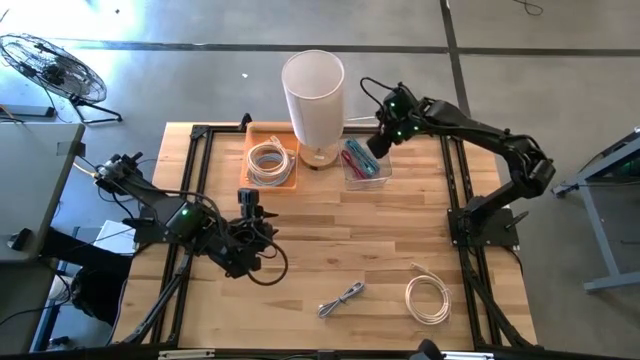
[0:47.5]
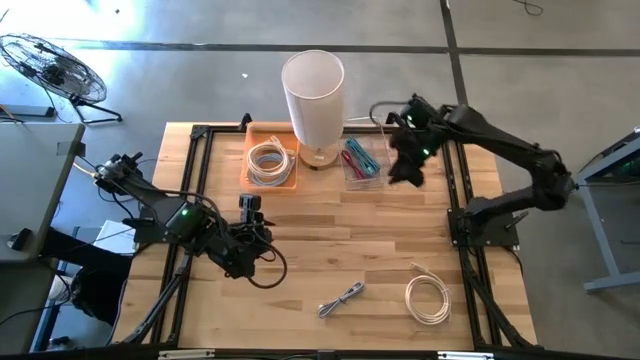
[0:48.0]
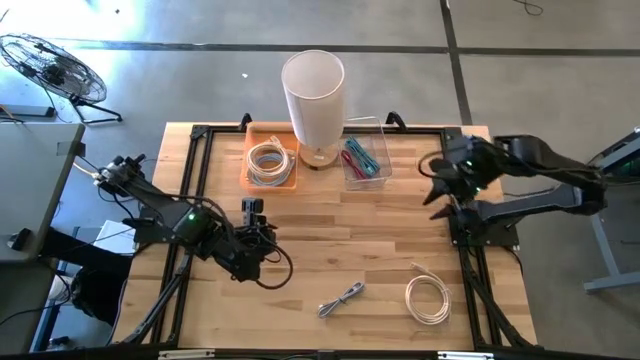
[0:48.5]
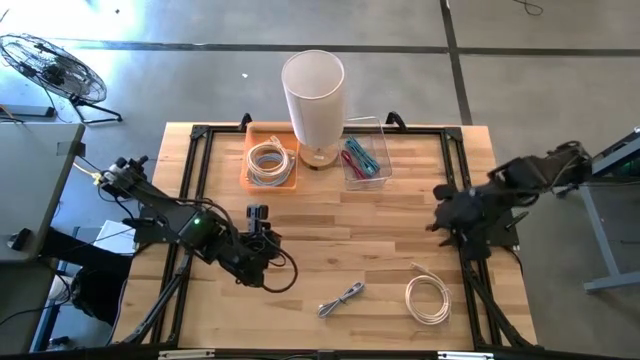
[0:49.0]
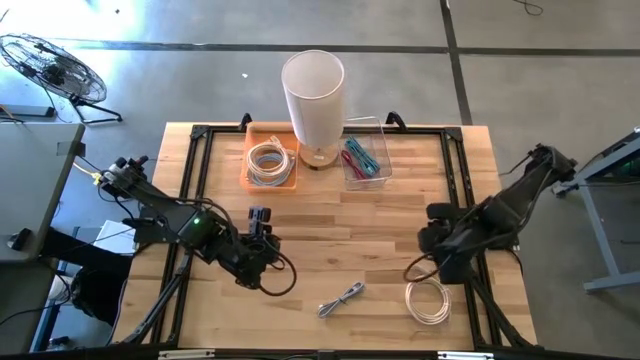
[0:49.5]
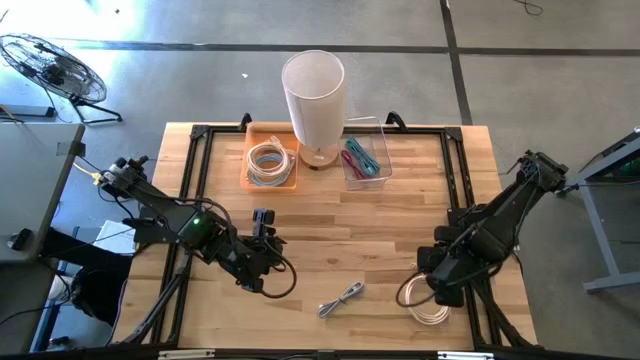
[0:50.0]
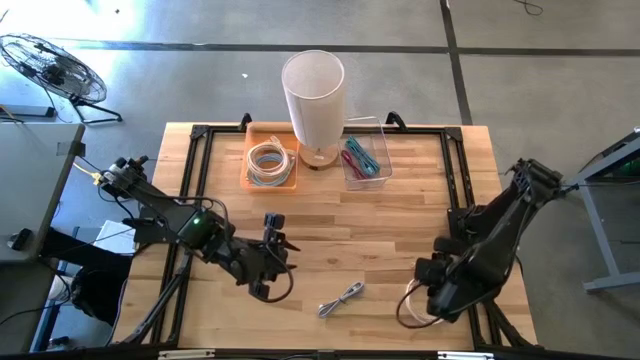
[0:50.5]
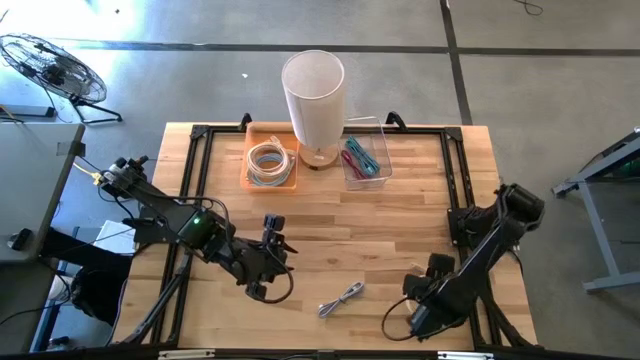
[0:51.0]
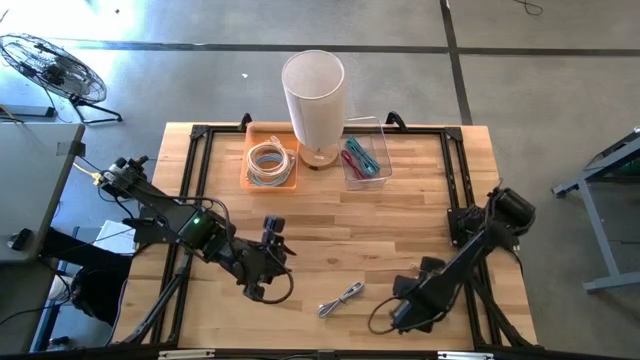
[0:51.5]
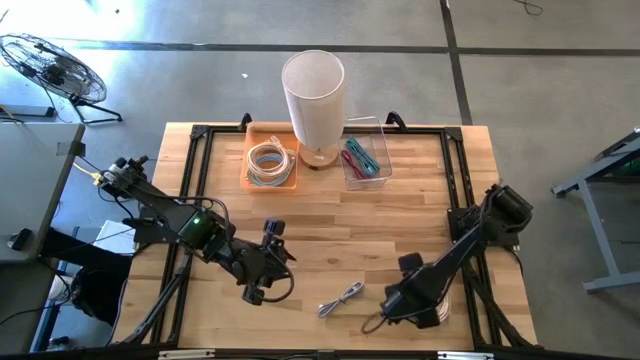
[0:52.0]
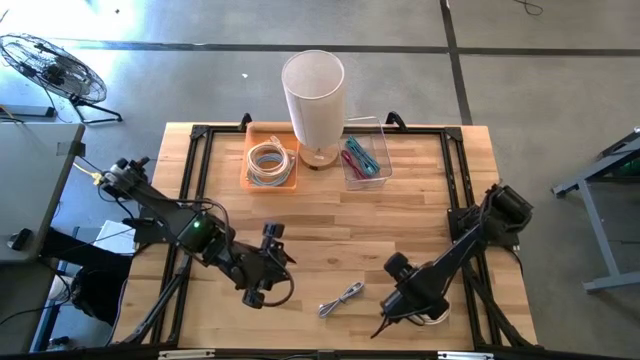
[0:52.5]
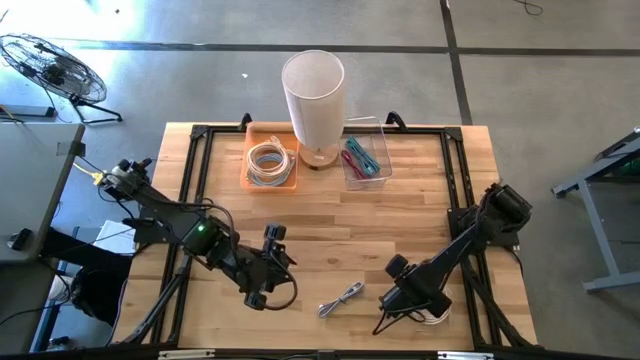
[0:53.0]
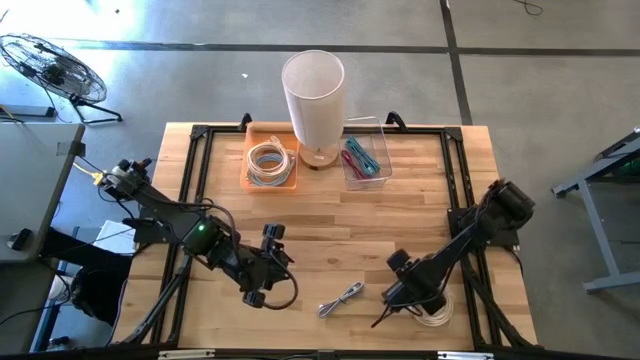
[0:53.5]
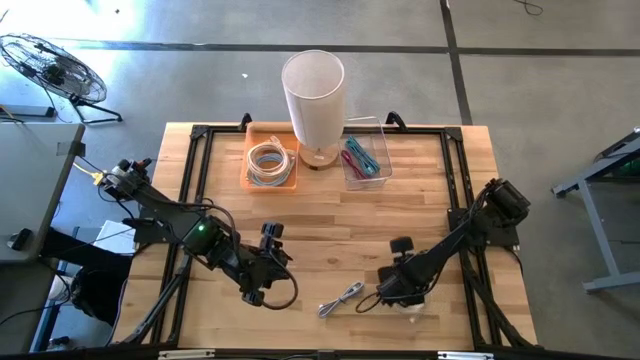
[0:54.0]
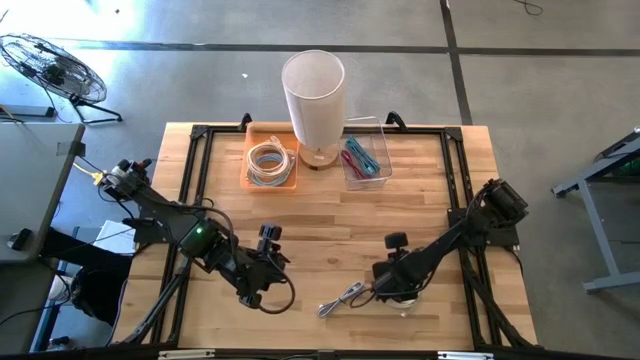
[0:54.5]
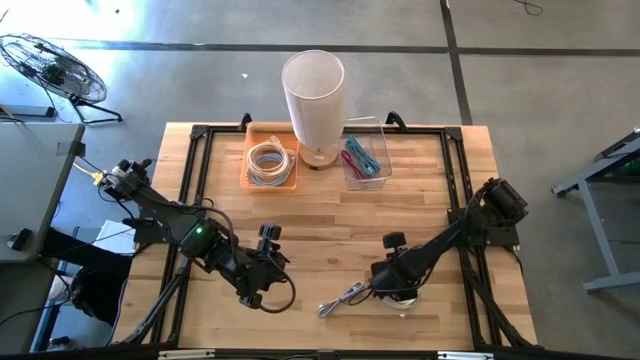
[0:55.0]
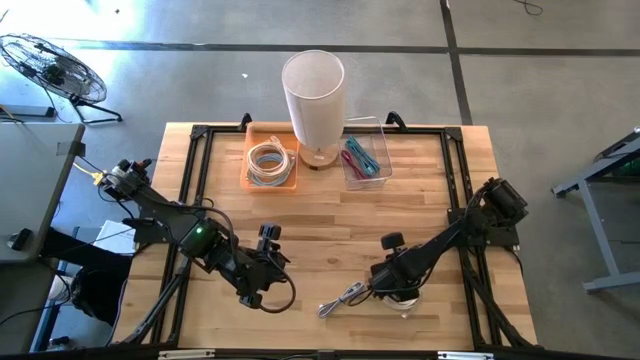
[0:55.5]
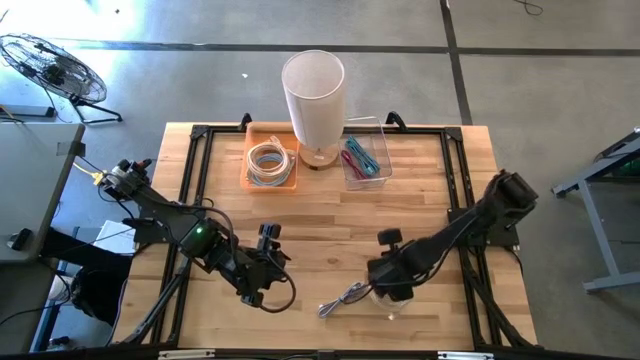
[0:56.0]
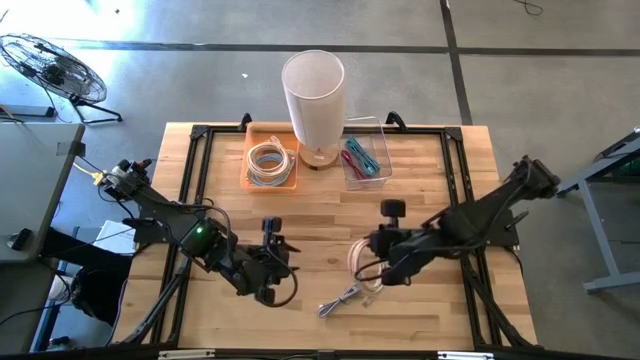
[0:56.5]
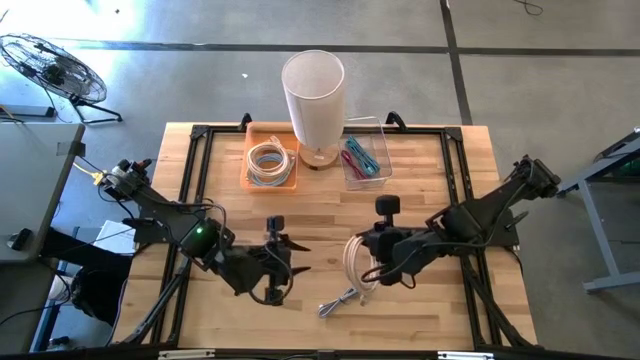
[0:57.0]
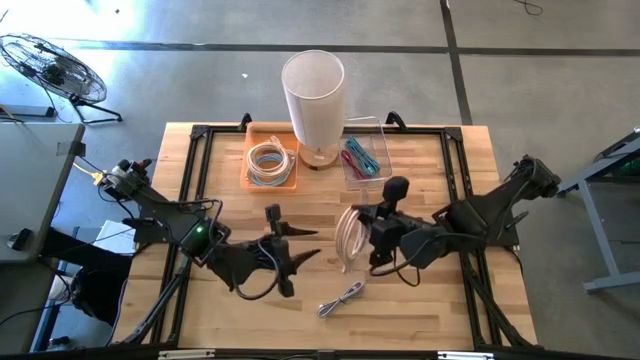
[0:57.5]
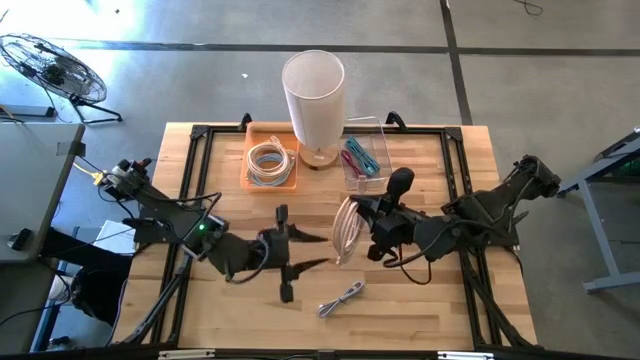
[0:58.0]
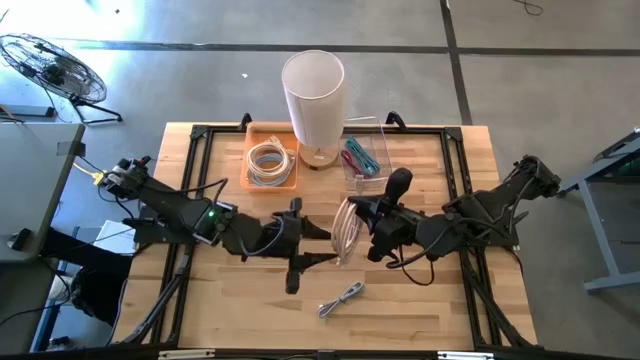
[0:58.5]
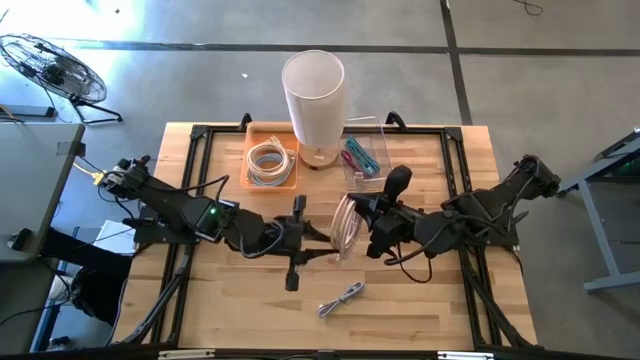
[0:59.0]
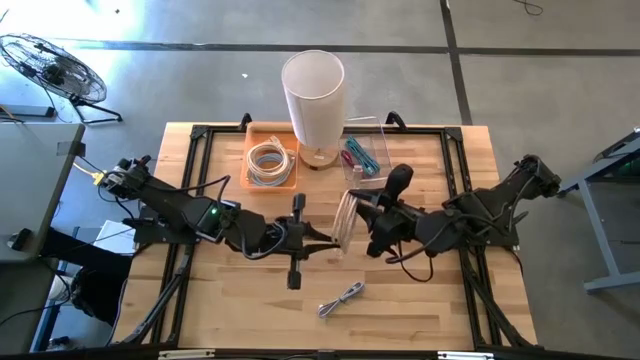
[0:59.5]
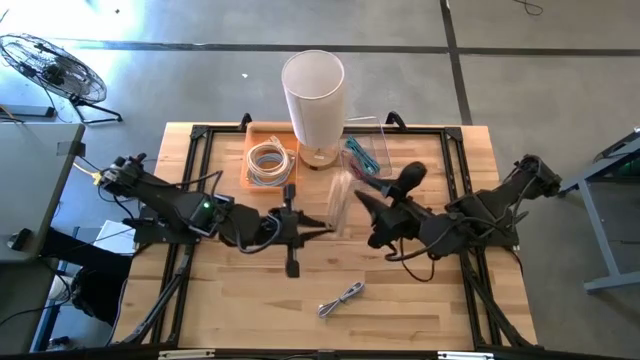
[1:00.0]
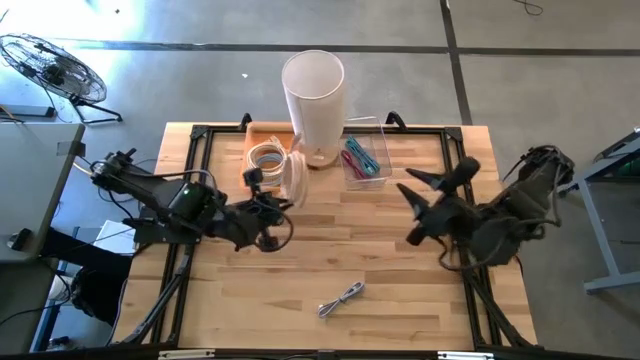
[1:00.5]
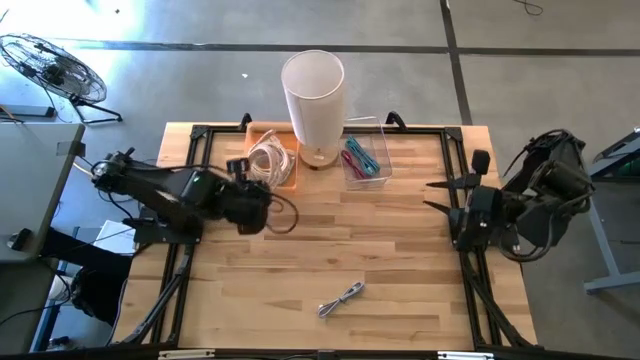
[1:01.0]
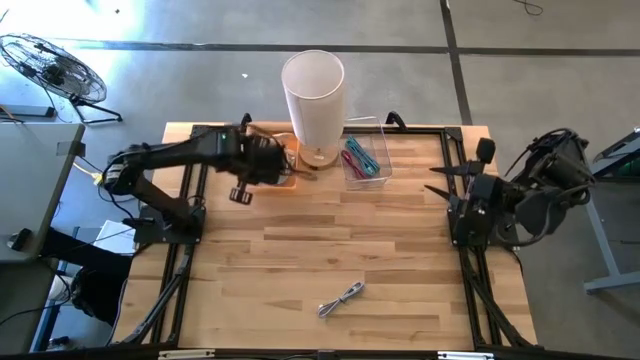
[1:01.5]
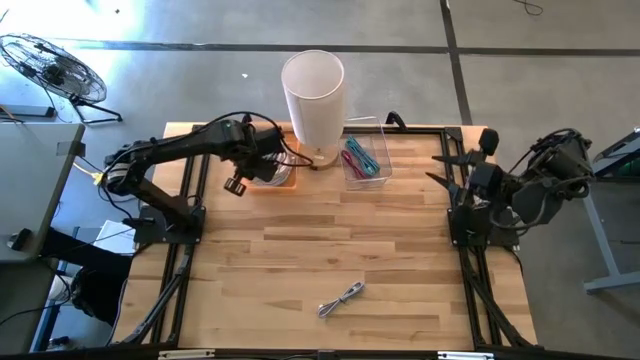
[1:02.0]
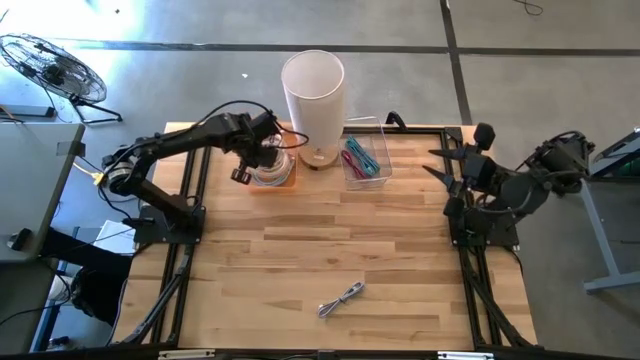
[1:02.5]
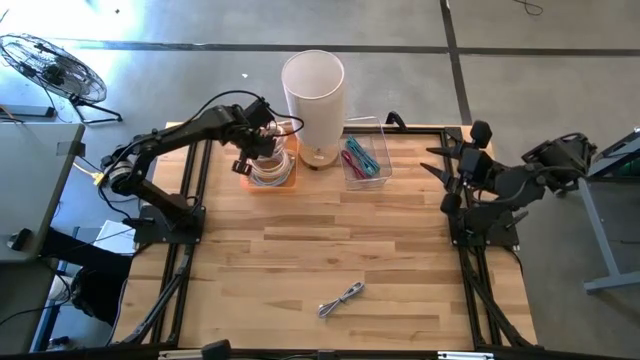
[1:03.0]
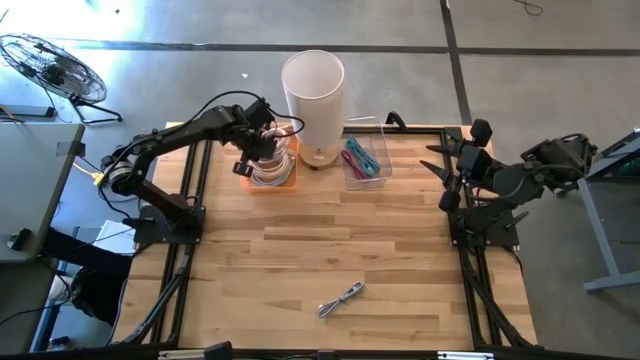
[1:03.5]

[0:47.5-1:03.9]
Task: Pick & Place USB Port
Put the light brown HDMI cable into the orange bin

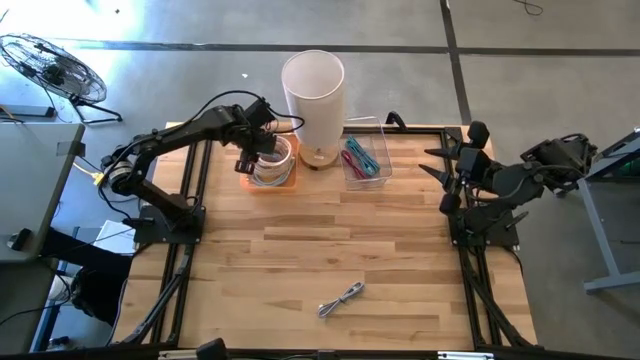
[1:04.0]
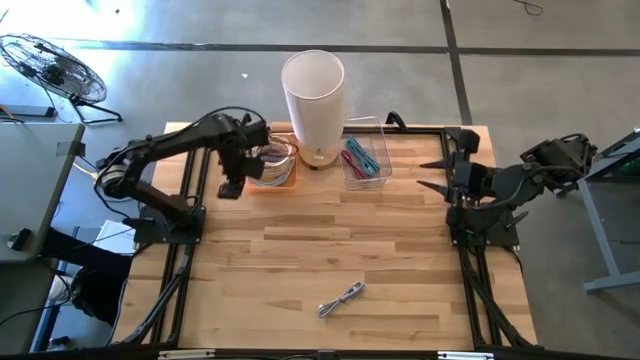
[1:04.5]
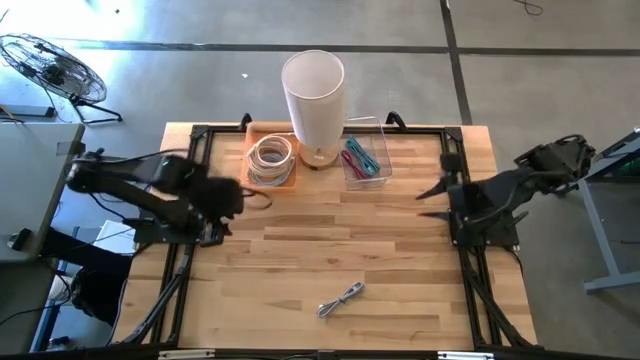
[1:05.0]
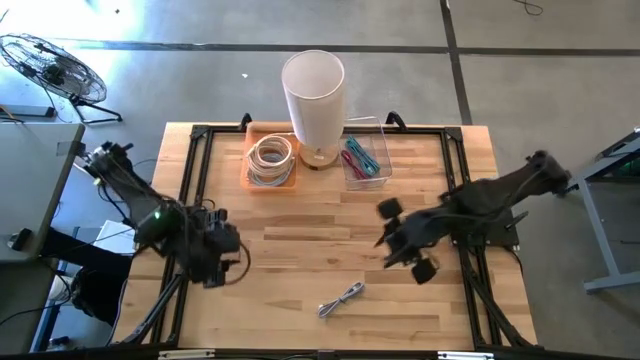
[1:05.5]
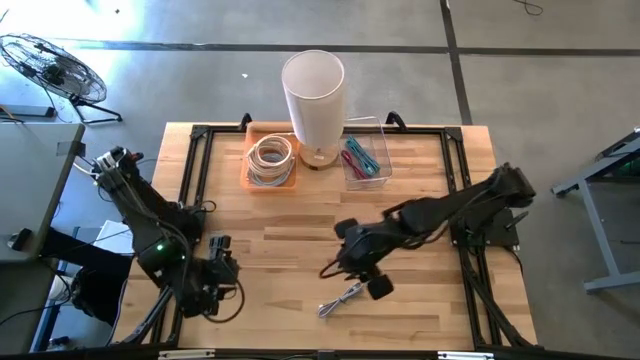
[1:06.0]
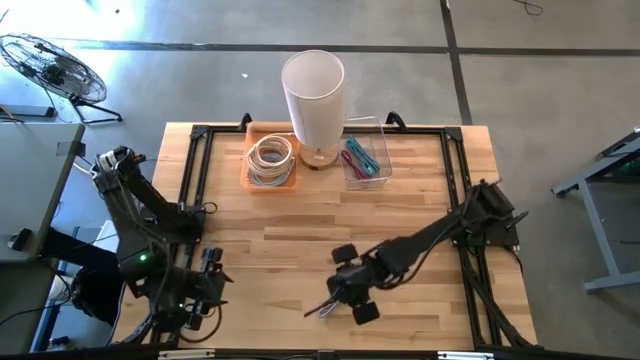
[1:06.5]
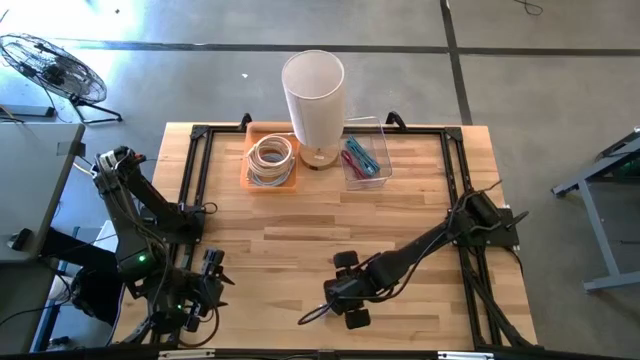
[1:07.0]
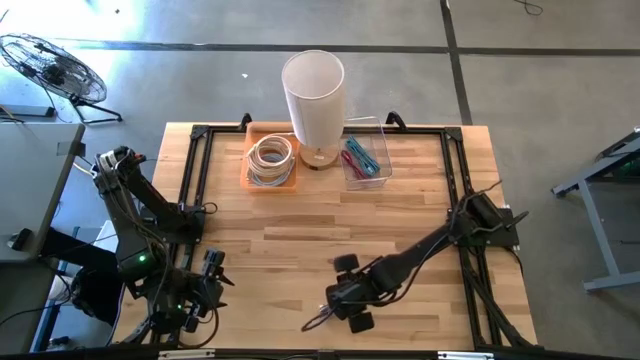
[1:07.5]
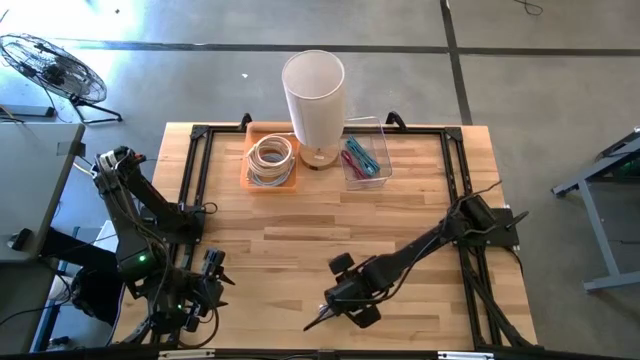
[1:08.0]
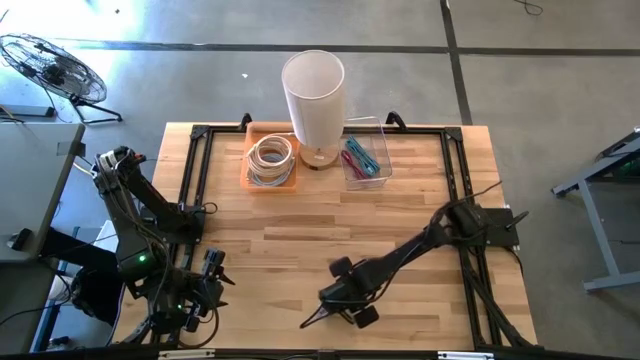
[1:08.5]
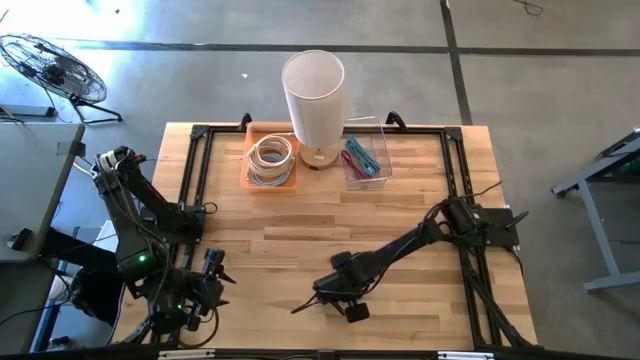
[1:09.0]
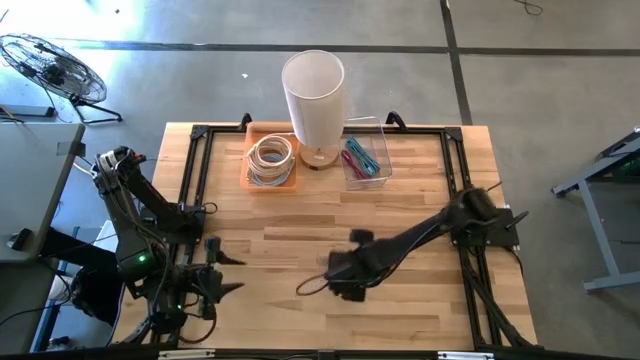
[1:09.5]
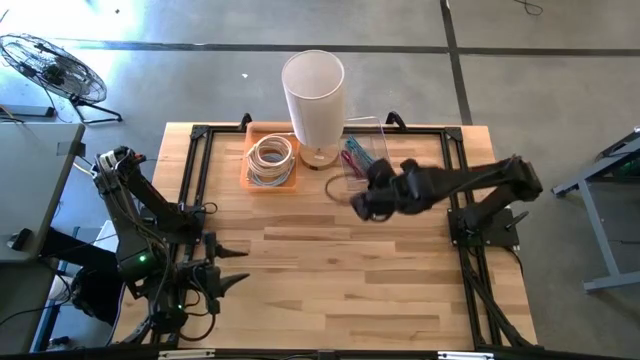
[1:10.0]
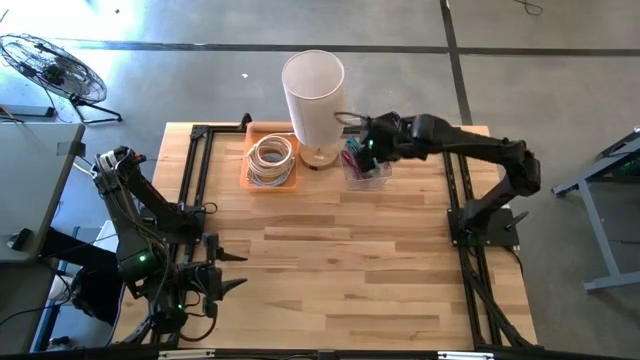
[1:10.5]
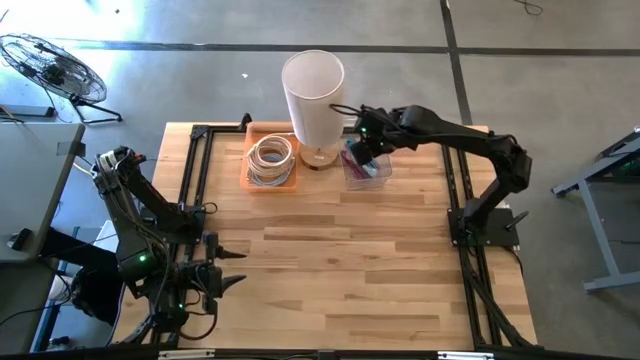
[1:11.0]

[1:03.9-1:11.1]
Put the white USB cable into the transparent bin
